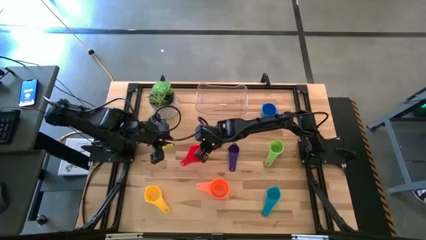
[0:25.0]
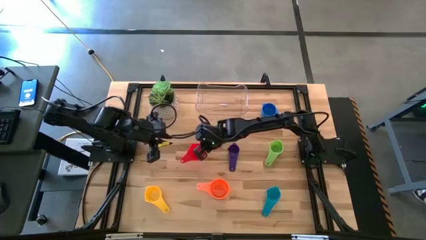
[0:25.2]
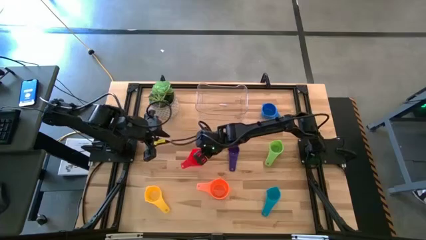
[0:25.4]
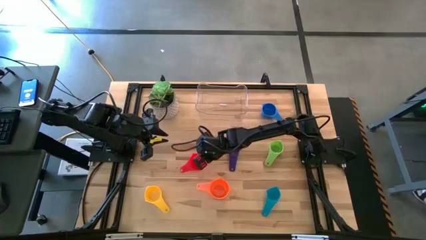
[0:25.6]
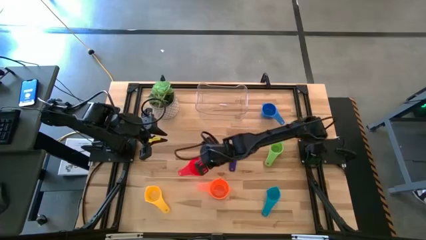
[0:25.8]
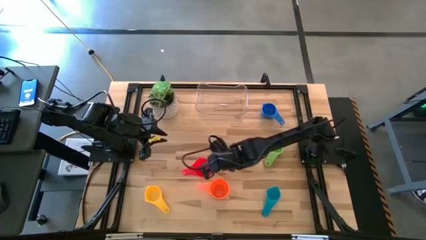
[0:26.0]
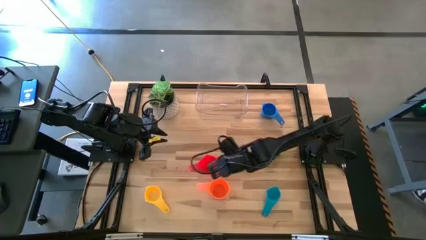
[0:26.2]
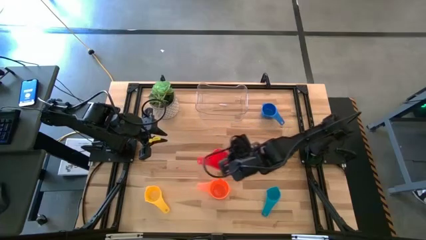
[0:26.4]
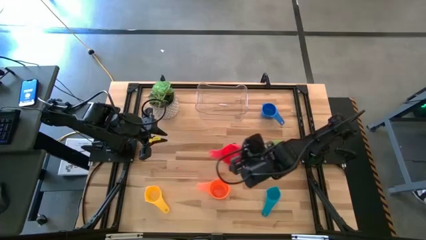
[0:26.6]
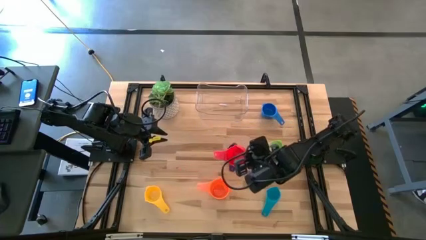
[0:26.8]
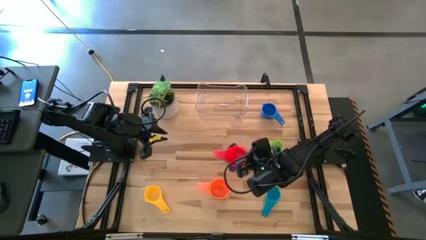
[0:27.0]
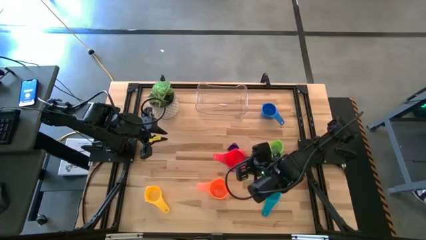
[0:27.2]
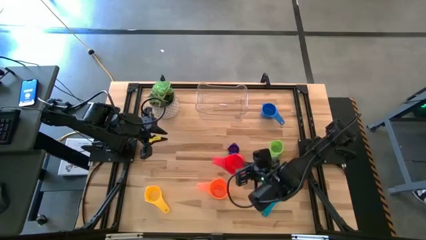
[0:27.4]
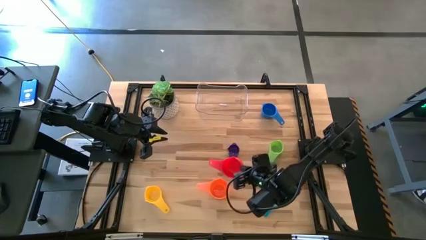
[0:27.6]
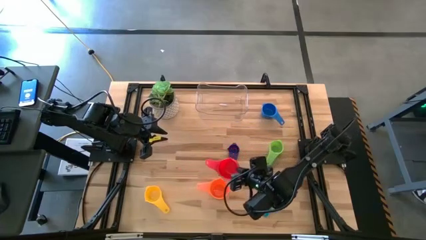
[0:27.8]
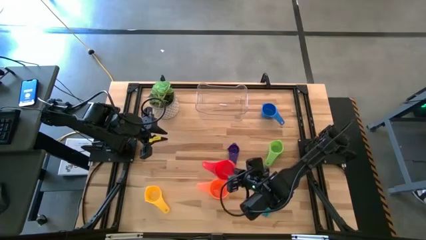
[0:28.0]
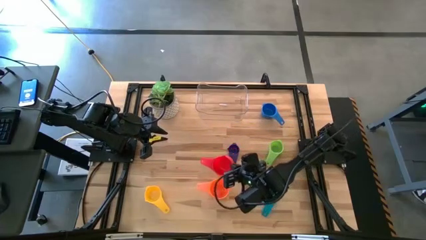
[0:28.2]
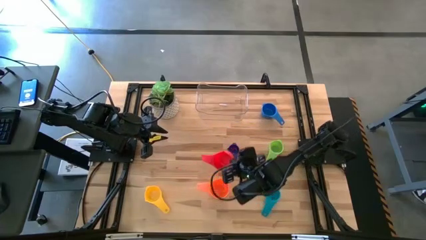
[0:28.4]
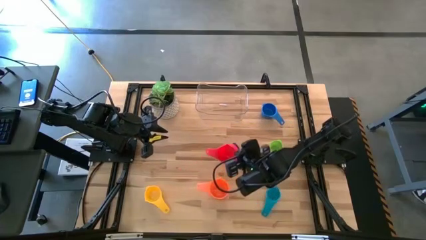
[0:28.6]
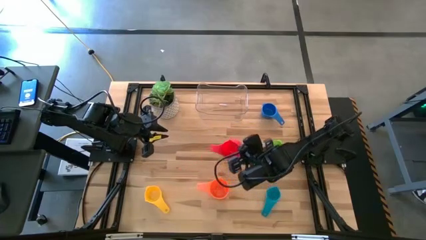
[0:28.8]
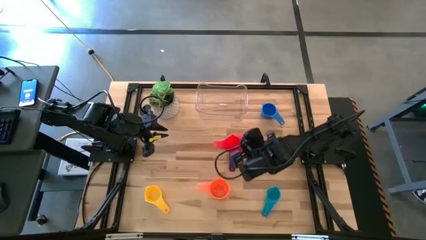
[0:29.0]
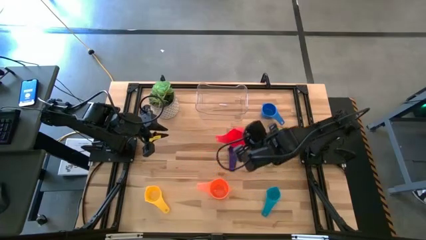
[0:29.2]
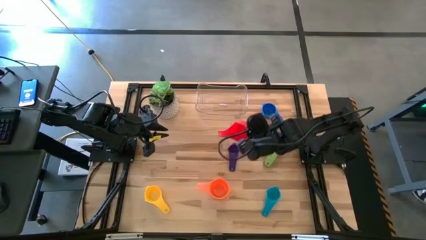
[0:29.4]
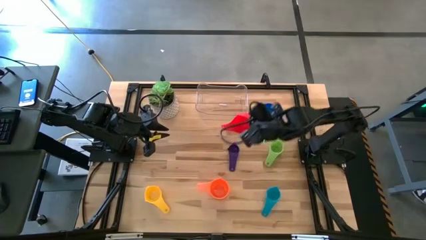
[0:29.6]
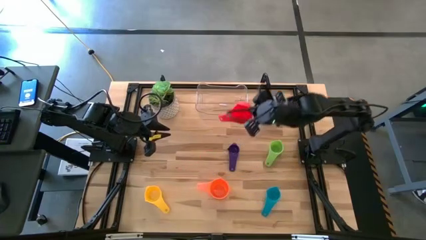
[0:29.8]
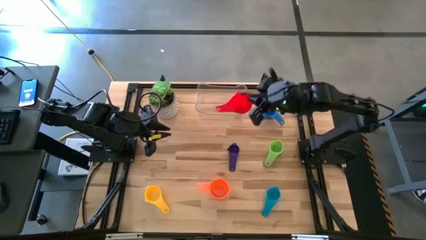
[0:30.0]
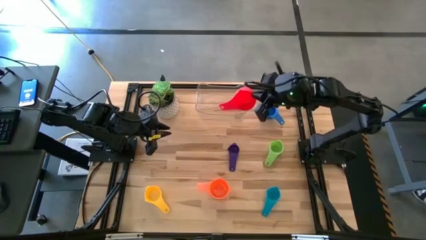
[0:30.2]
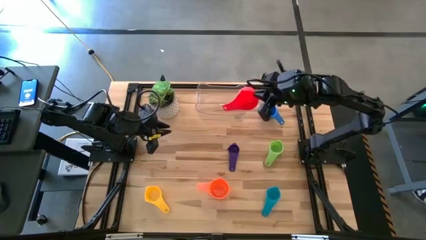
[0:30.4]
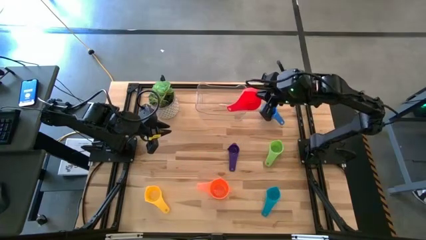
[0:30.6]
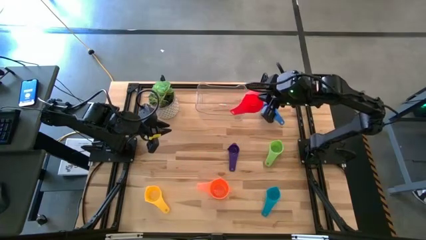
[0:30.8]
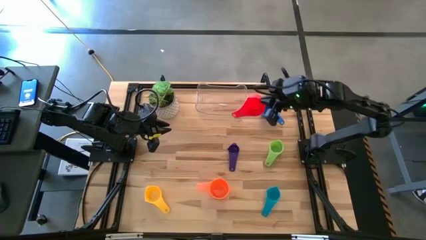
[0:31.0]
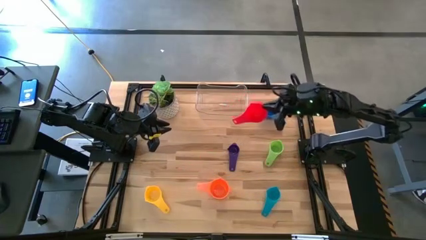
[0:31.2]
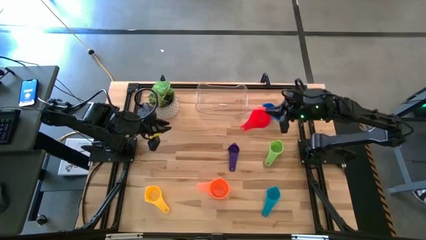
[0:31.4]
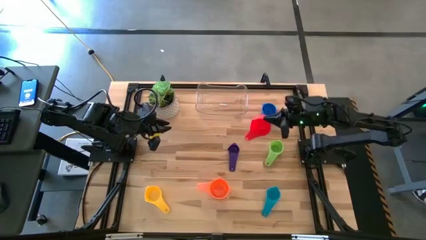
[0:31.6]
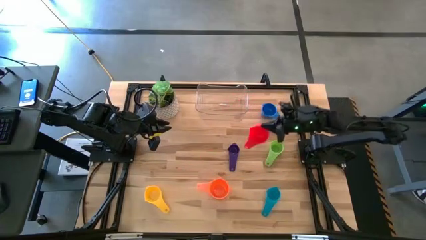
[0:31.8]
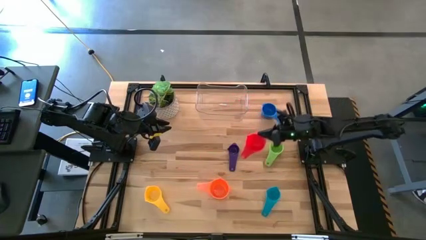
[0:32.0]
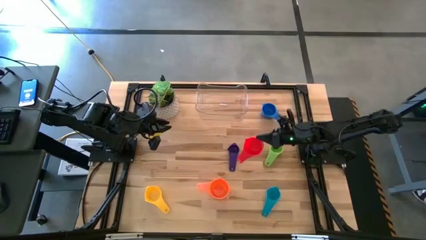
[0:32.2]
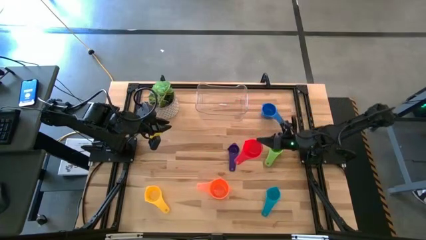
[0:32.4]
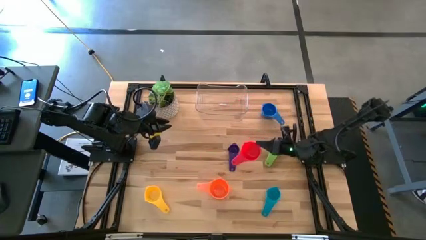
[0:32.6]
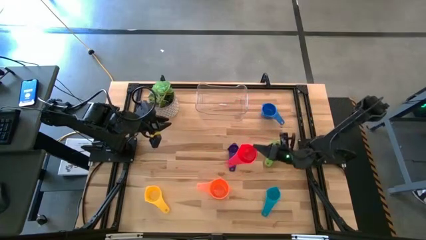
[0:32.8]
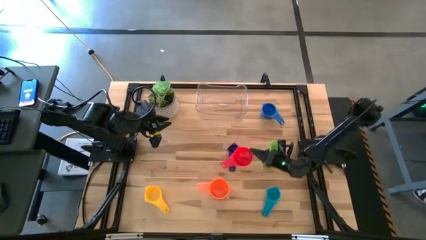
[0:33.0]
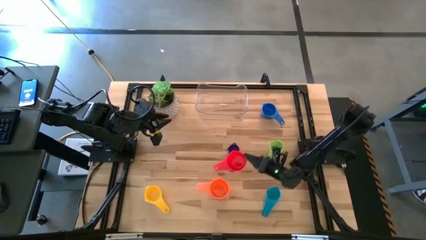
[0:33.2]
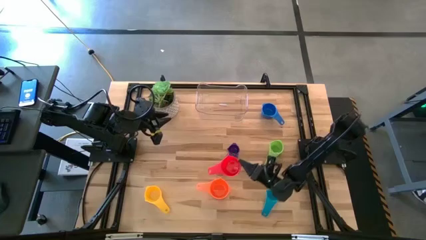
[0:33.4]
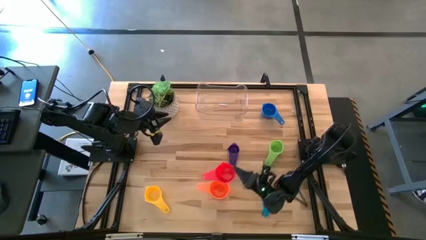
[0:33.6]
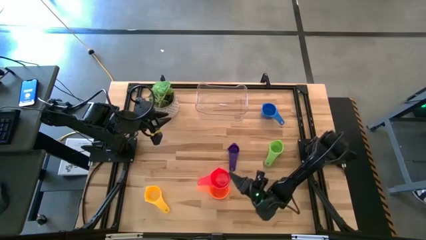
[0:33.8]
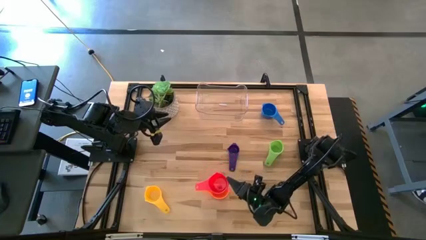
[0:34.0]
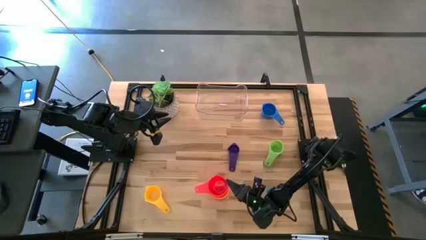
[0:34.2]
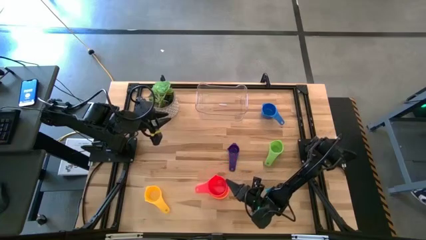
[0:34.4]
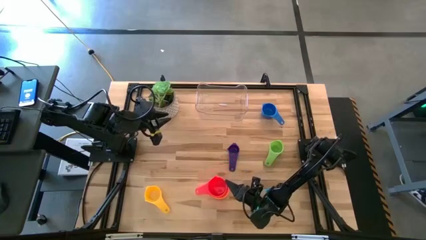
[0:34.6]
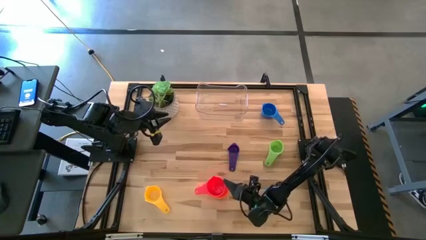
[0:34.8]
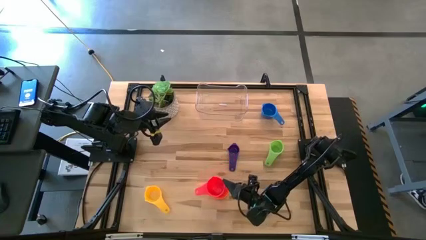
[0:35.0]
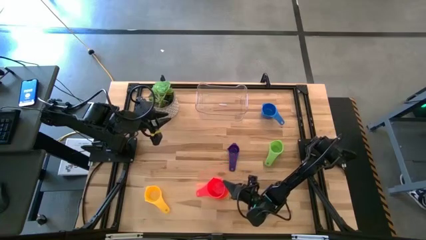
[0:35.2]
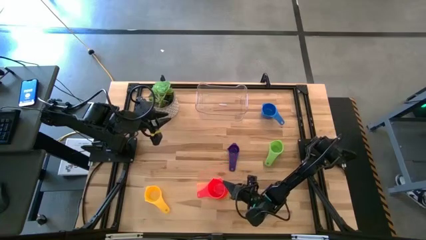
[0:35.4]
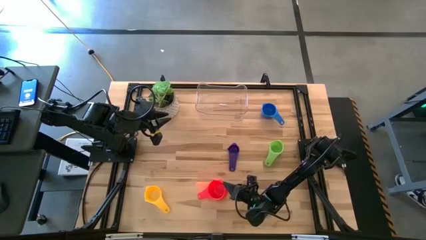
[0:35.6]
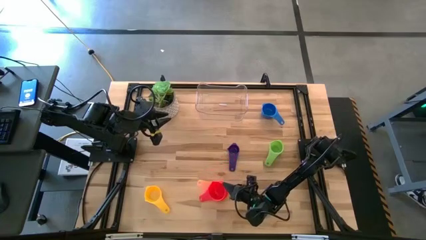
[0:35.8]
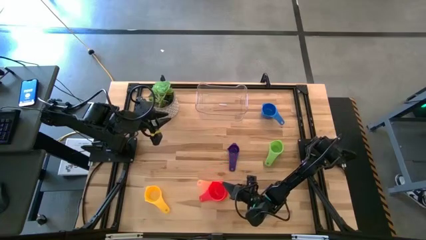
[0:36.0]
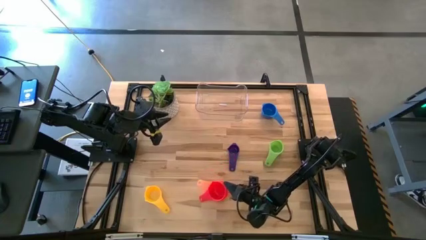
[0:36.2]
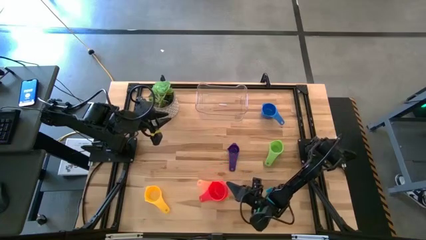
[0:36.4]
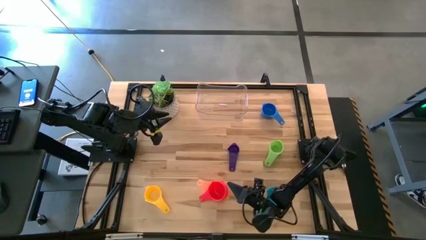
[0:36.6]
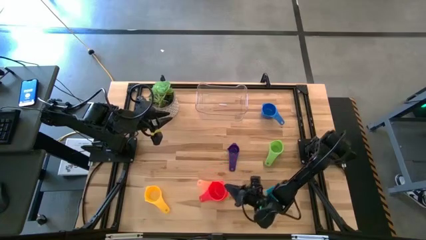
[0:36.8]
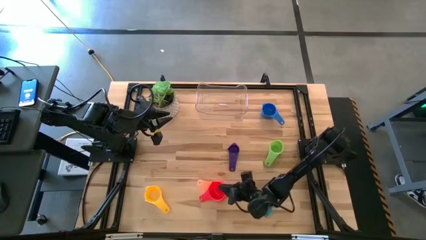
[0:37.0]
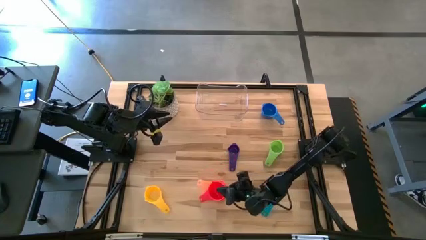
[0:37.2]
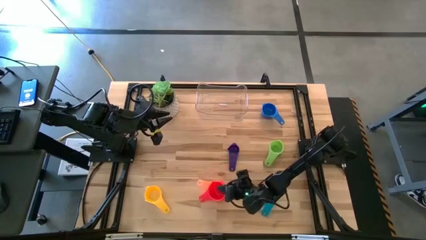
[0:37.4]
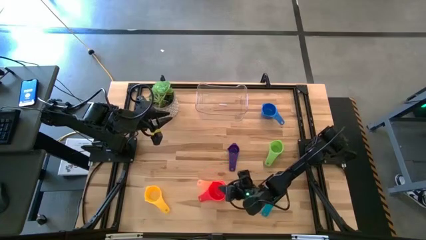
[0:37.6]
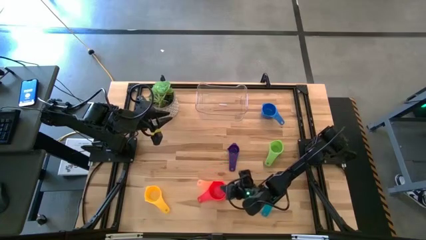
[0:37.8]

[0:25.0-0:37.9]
Task: Nest measuring cups in basket
Stack the red measuring cup into the orange measuring cup

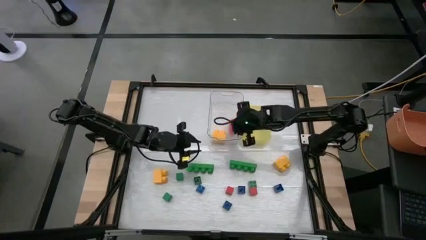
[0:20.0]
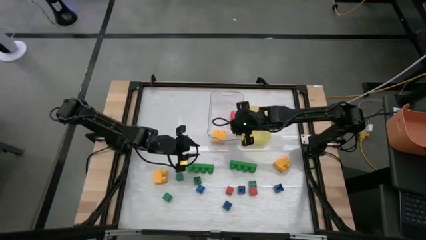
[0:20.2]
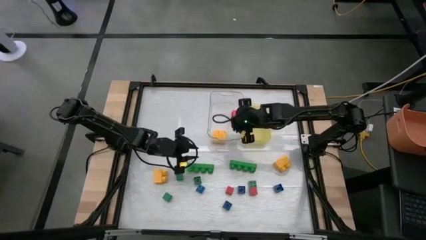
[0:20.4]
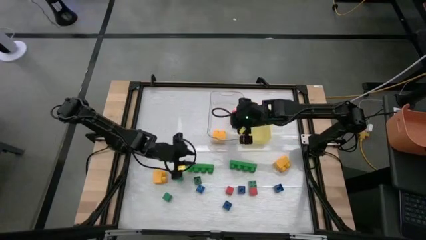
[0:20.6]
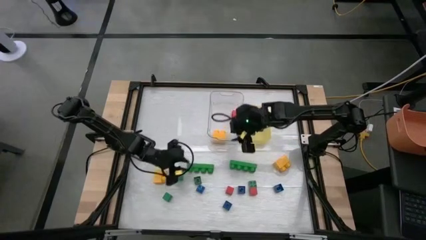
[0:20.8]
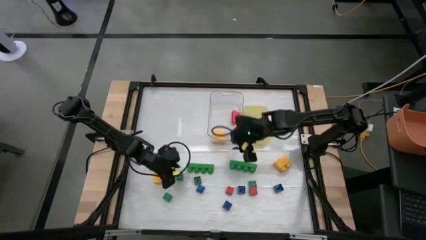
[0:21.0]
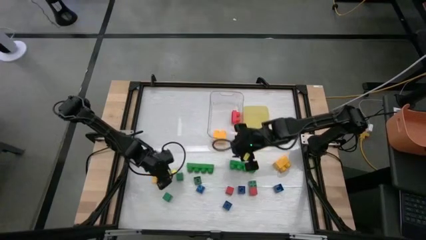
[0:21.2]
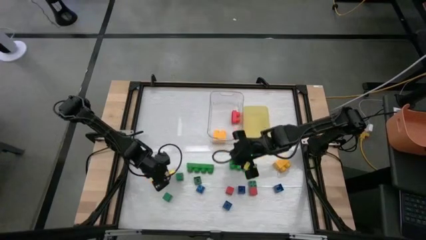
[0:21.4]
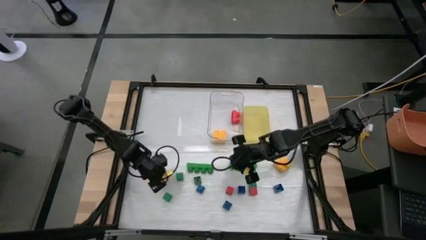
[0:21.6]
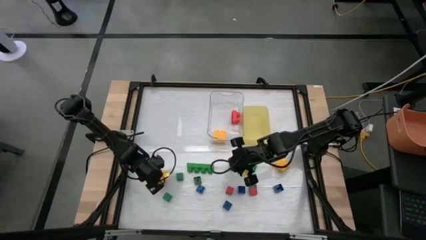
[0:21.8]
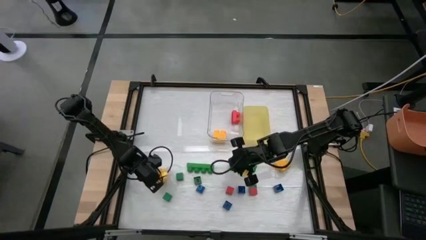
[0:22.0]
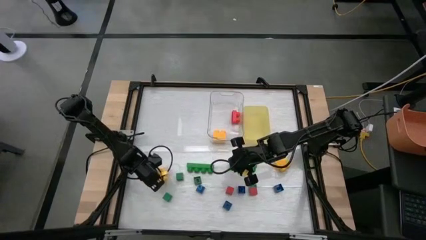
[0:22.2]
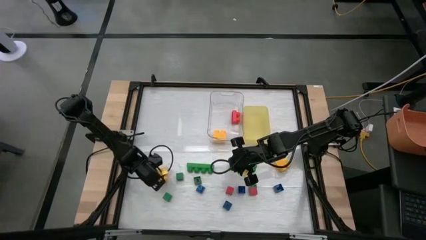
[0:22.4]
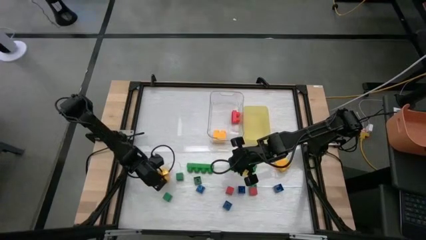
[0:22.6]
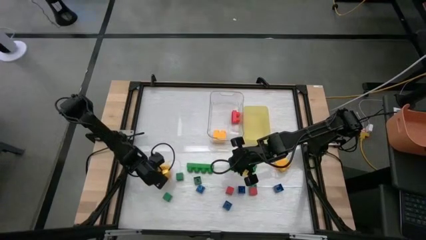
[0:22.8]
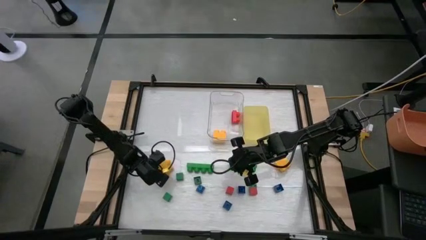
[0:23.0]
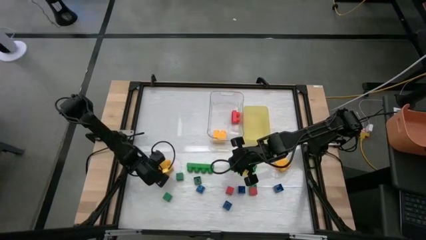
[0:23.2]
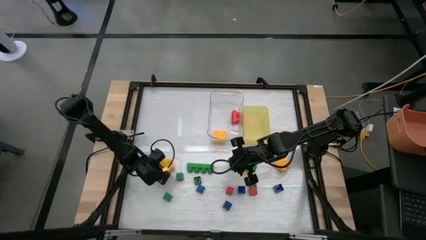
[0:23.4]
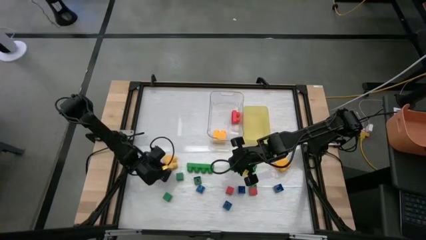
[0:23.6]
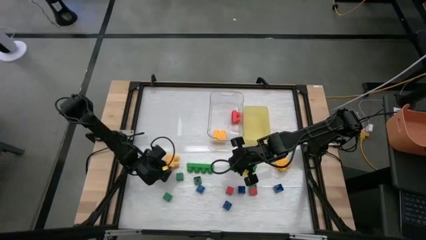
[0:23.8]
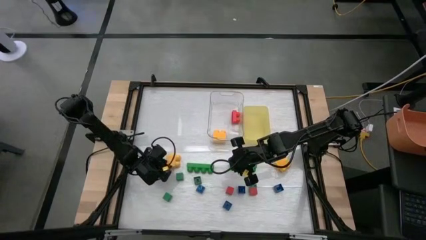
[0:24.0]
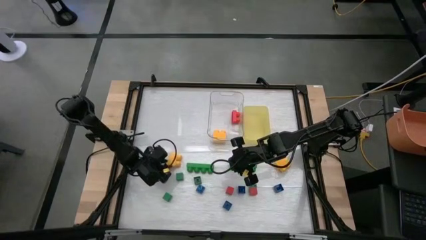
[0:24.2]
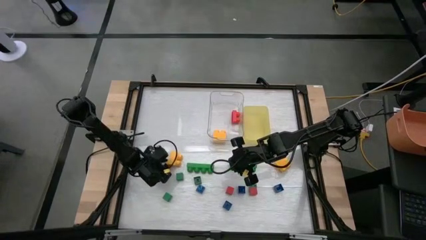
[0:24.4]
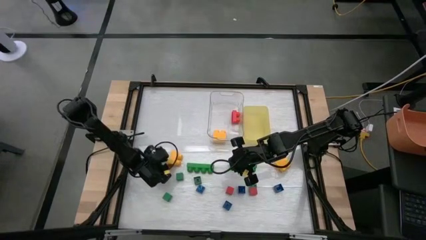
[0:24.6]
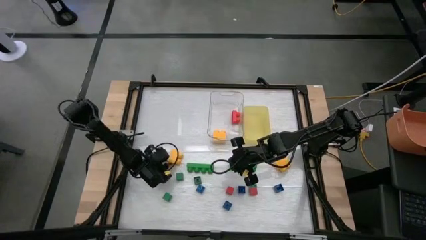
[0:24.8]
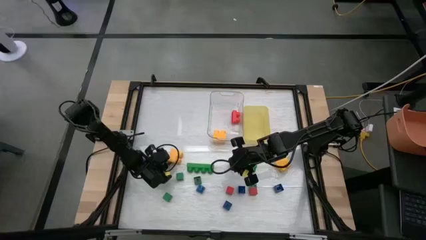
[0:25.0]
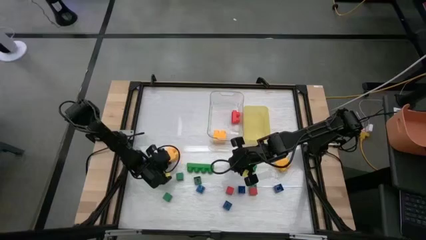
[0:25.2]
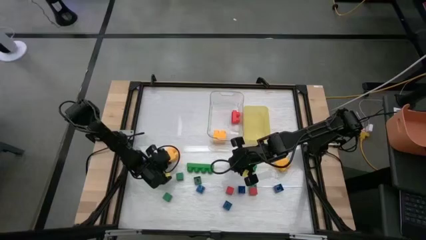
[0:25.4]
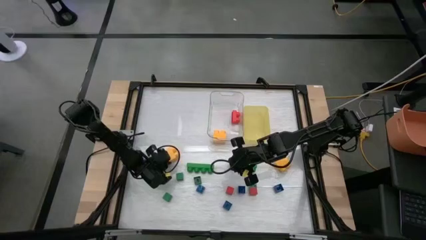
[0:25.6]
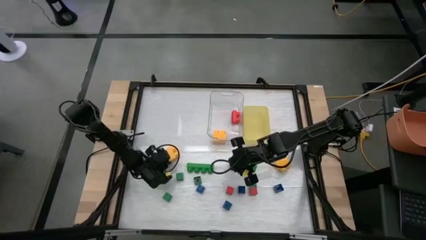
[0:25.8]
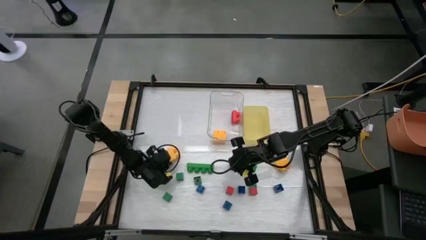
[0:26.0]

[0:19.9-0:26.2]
Task: Sort blocks by size
Put the large yellow game piece into the transparent bin
